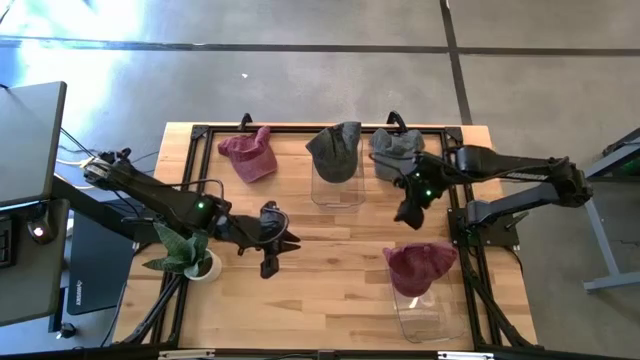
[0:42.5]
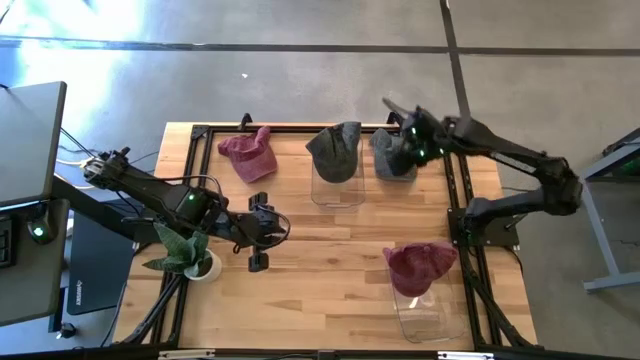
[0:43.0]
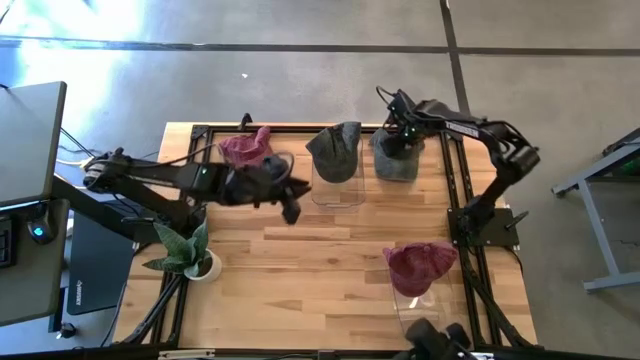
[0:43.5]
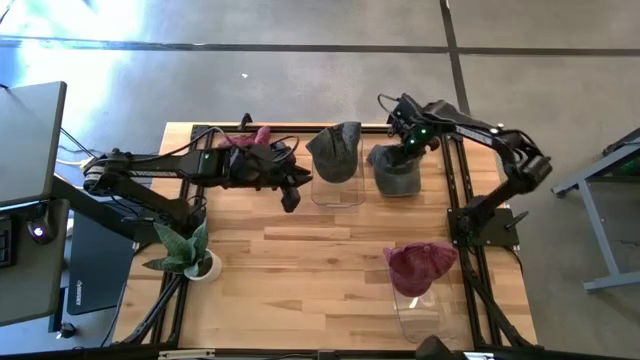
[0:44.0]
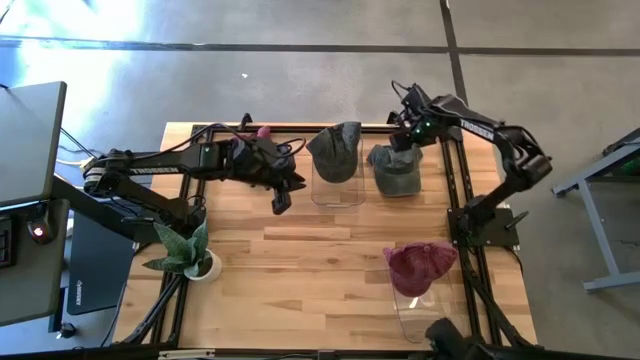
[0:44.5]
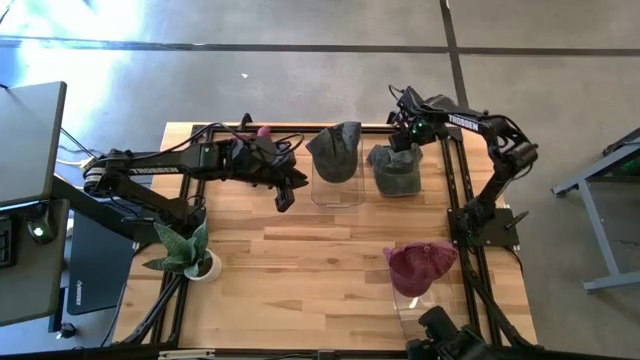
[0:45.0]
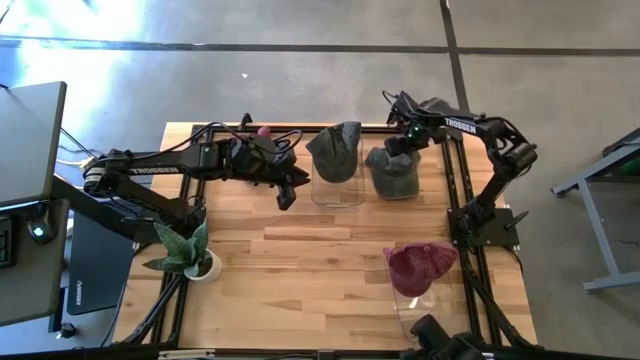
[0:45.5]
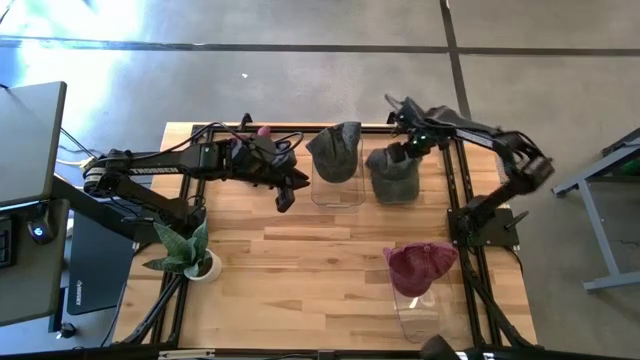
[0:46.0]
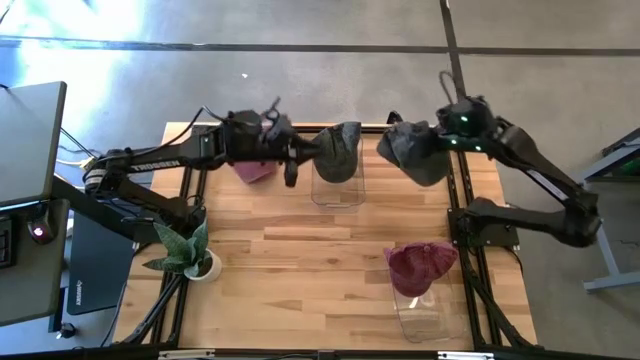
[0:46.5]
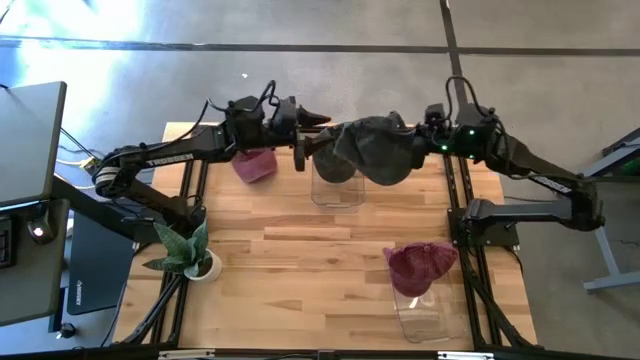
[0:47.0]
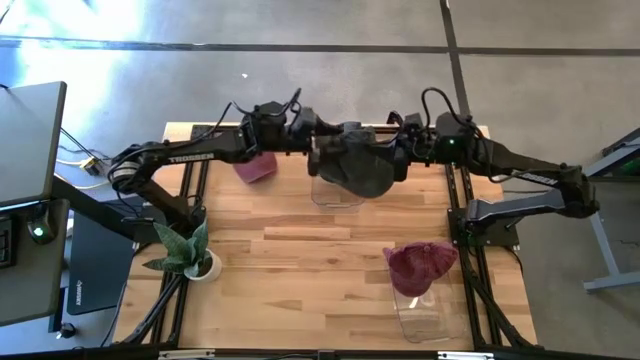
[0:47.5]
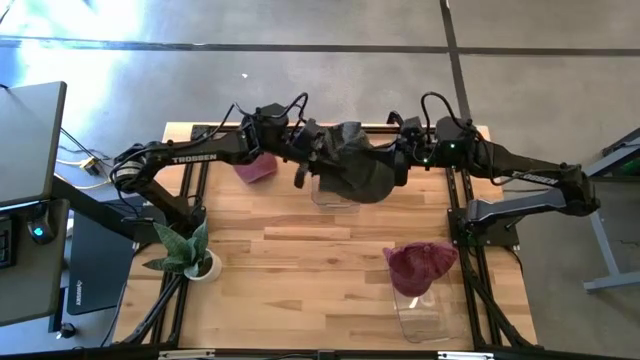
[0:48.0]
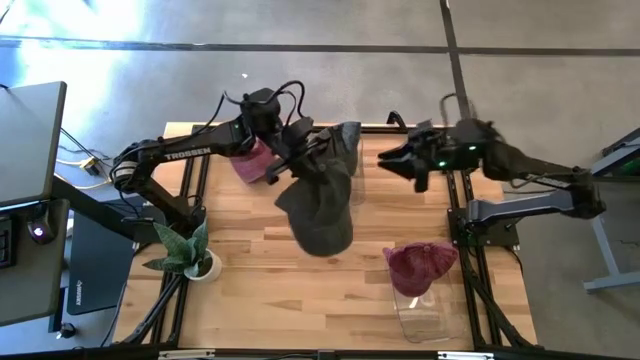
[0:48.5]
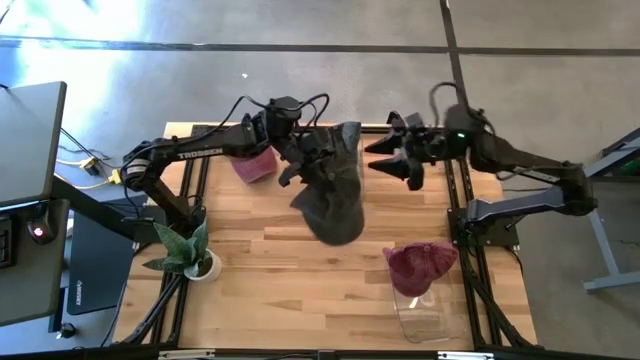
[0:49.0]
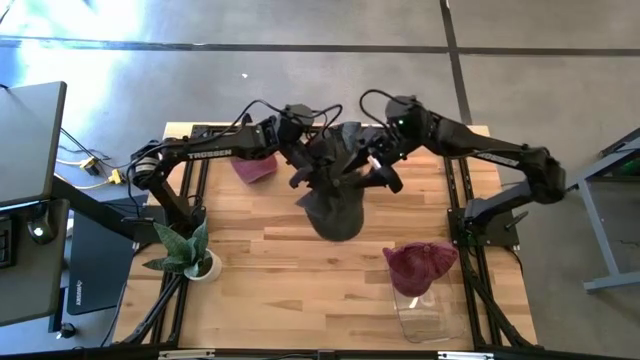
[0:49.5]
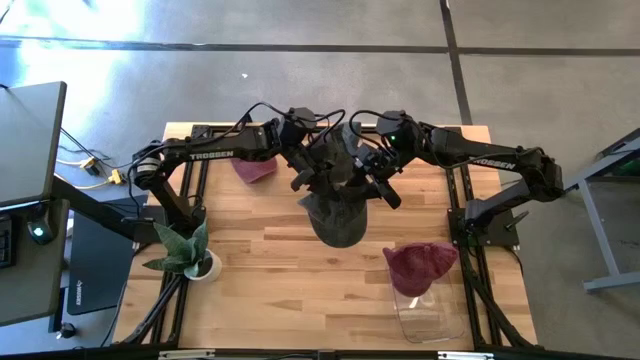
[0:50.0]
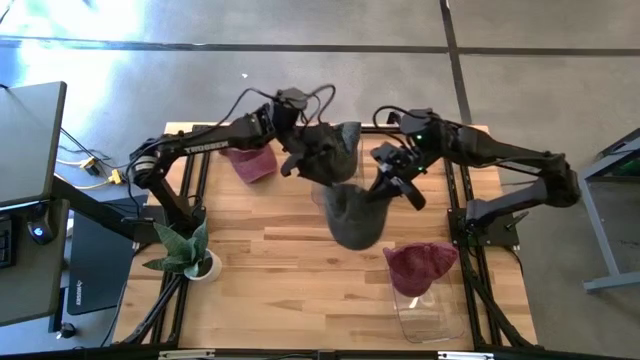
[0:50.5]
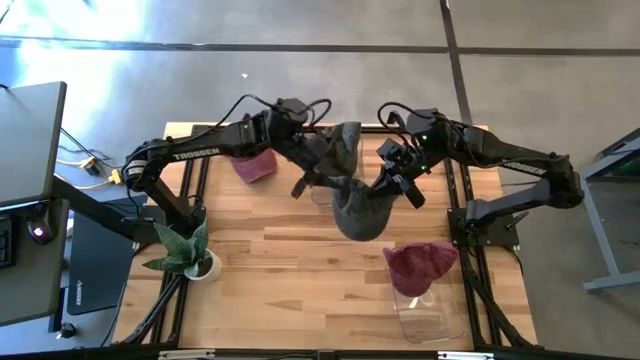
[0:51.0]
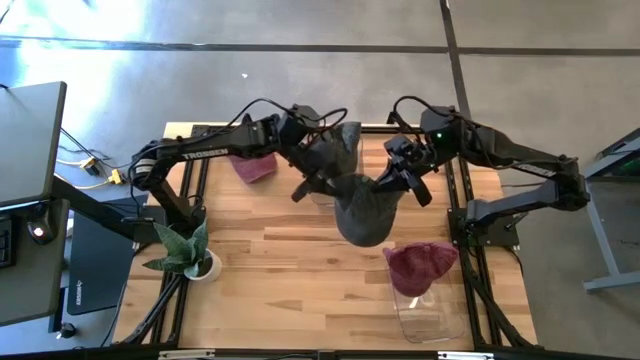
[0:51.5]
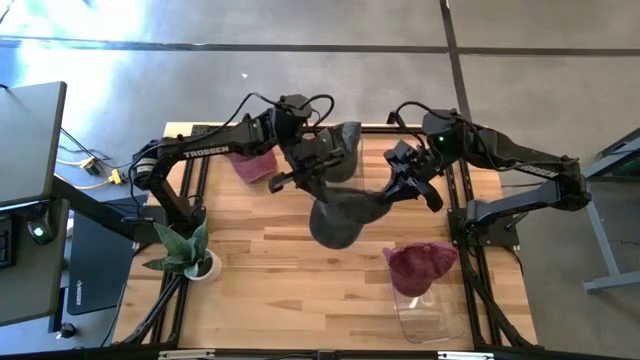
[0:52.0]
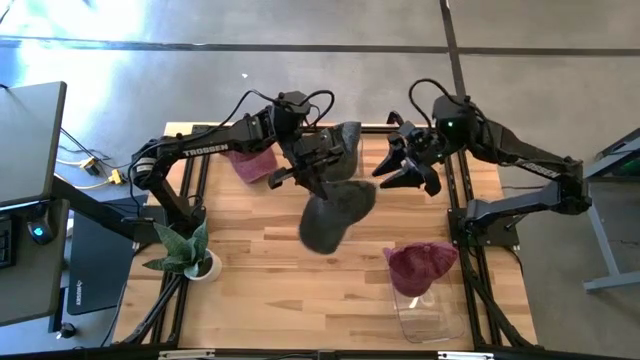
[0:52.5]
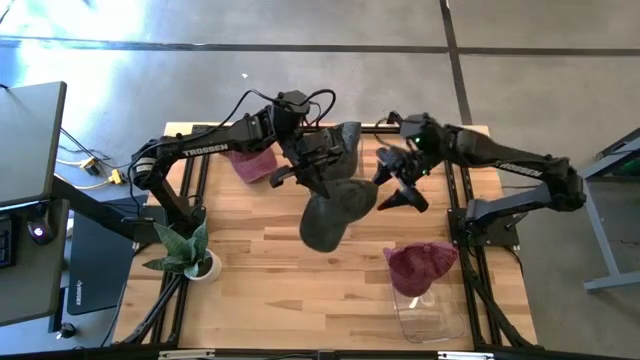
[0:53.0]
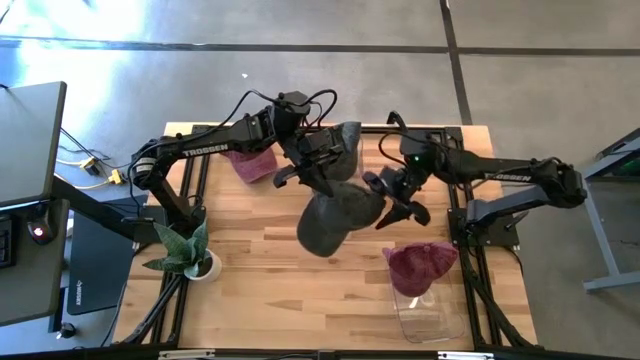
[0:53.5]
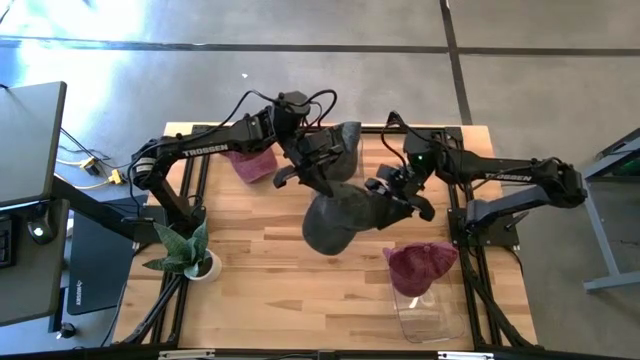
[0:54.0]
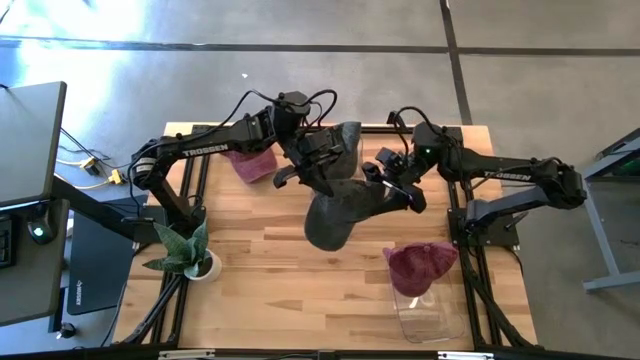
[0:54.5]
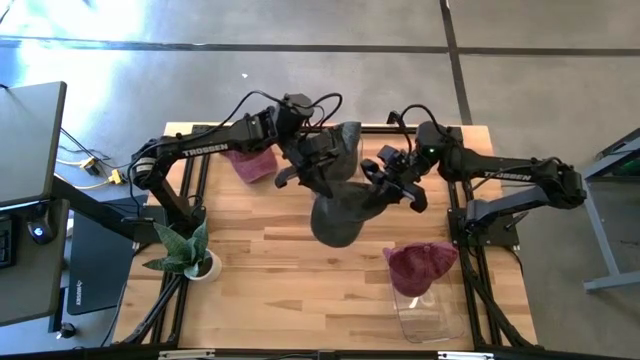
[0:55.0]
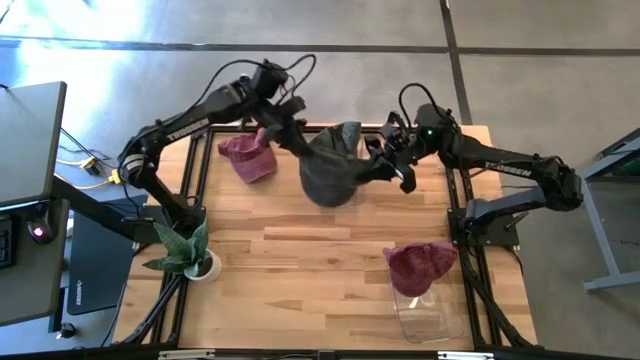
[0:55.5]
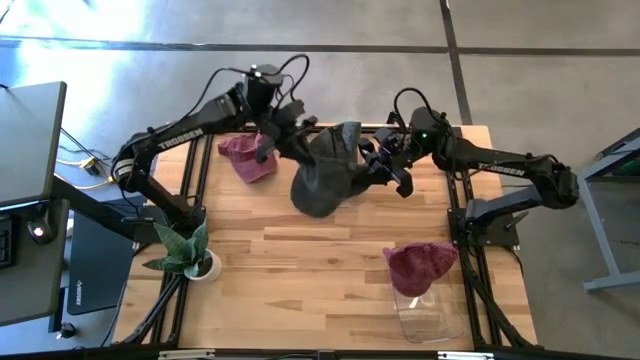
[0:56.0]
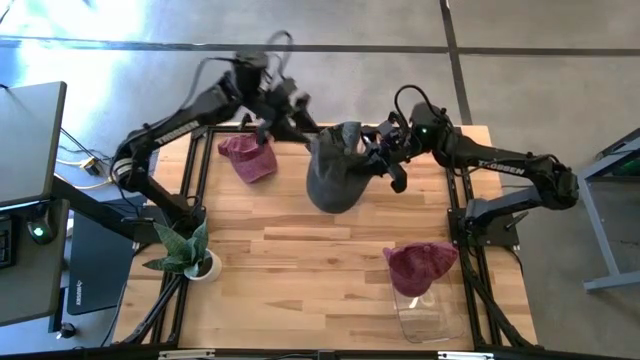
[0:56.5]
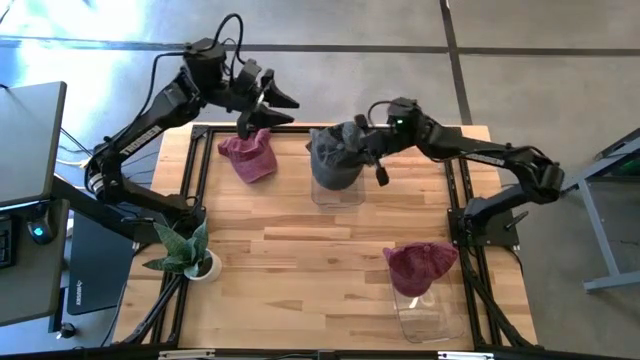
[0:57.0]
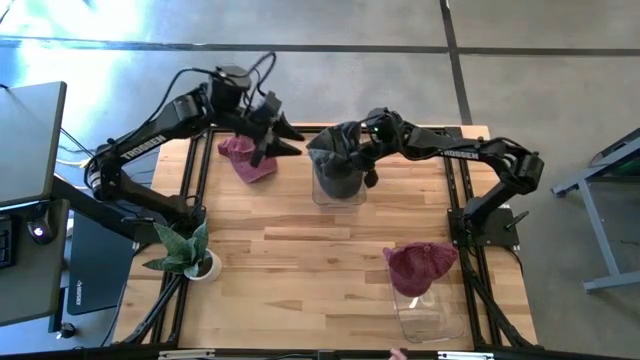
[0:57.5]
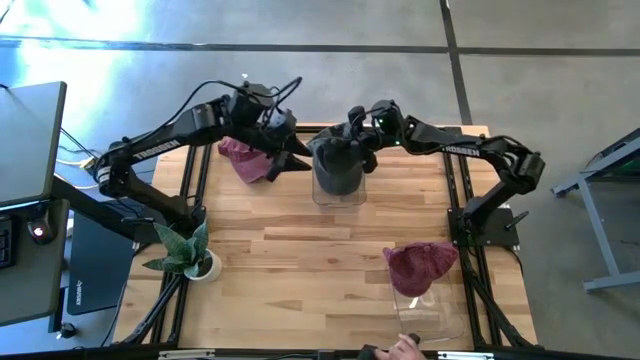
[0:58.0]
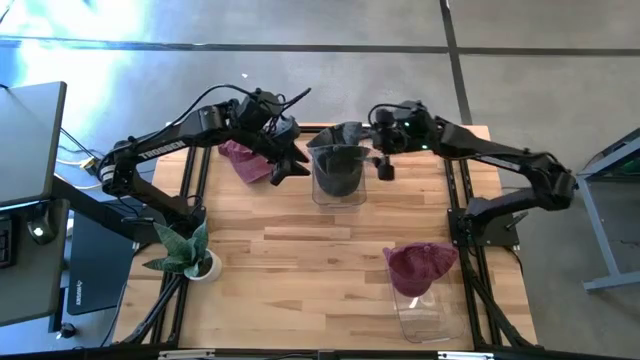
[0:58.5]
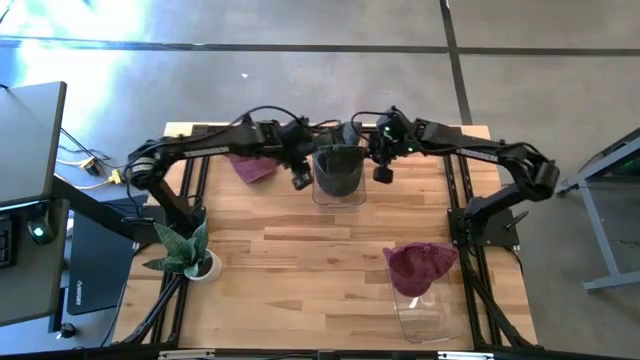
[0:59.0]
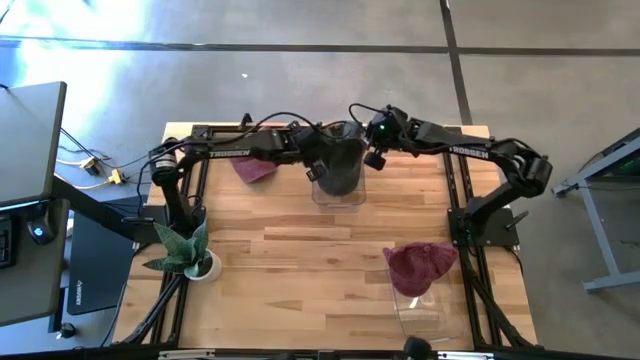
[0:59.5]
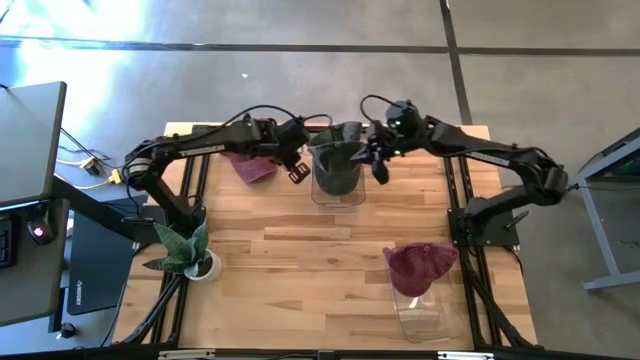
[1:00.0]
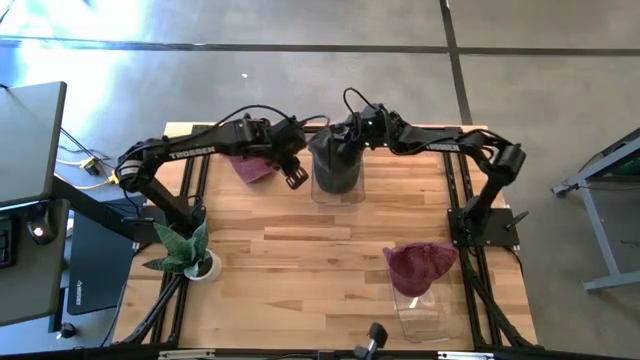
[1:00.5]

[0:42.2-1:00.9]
Task: Pick & Place hat
Put the black cap into the top transparent bin

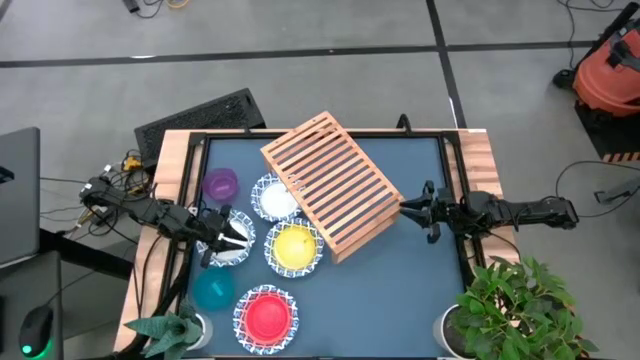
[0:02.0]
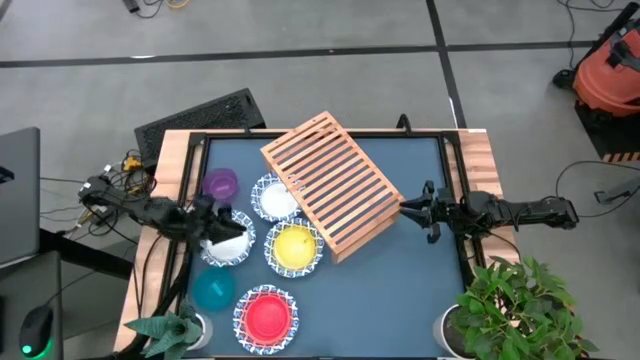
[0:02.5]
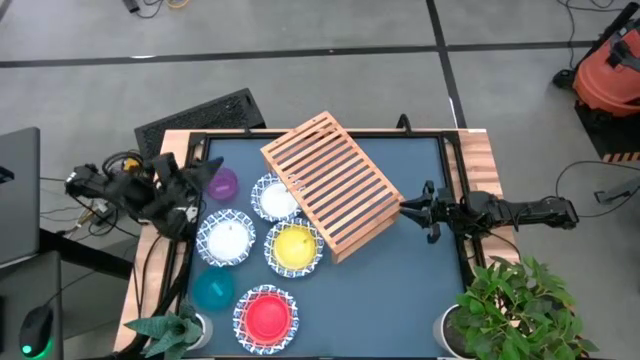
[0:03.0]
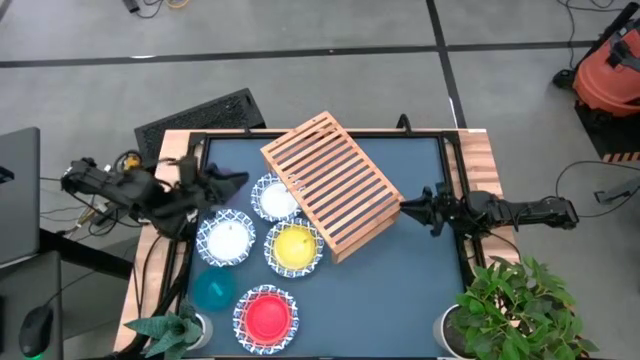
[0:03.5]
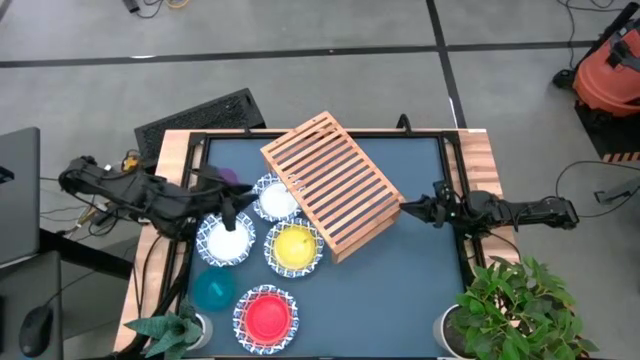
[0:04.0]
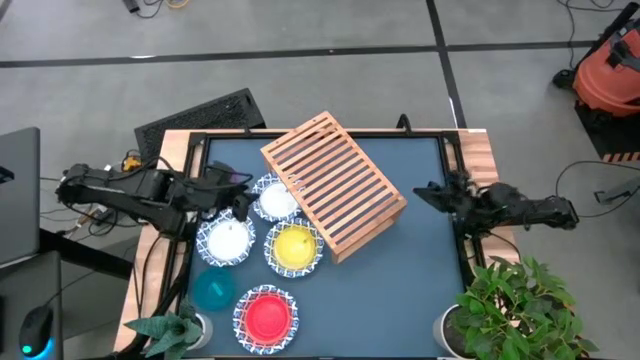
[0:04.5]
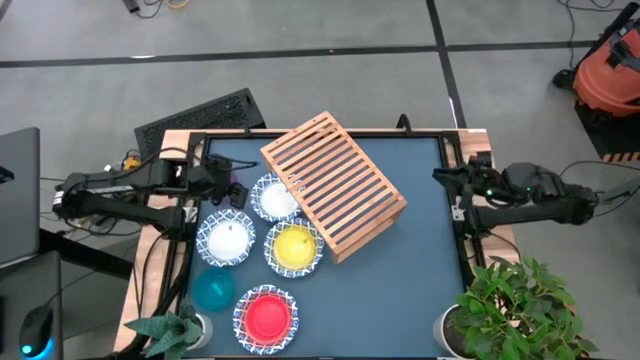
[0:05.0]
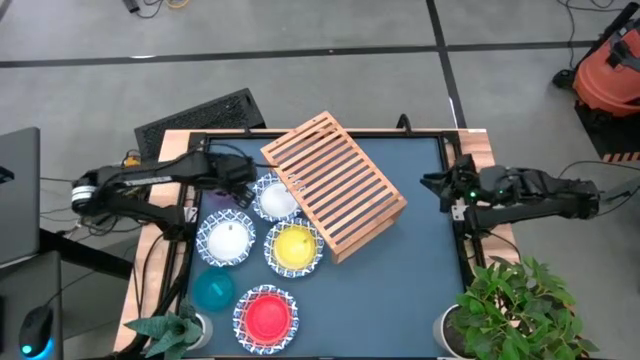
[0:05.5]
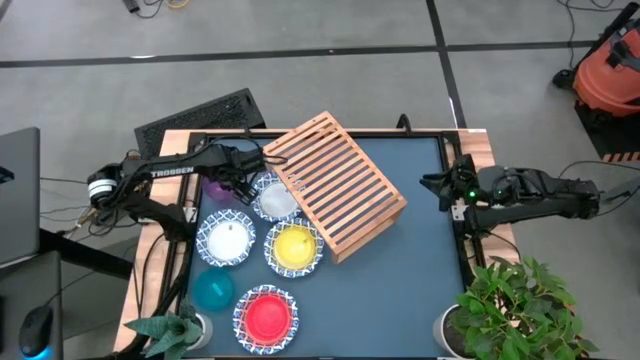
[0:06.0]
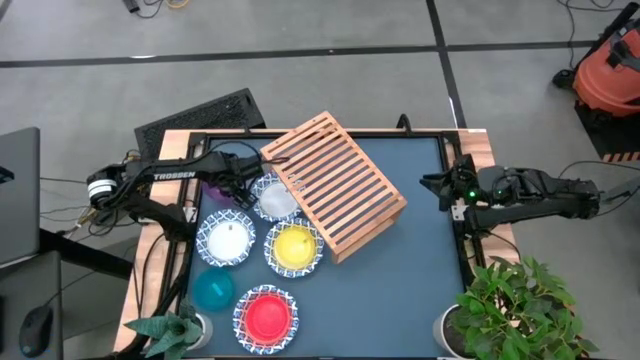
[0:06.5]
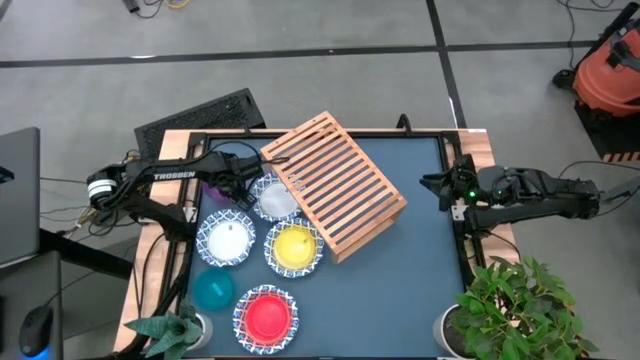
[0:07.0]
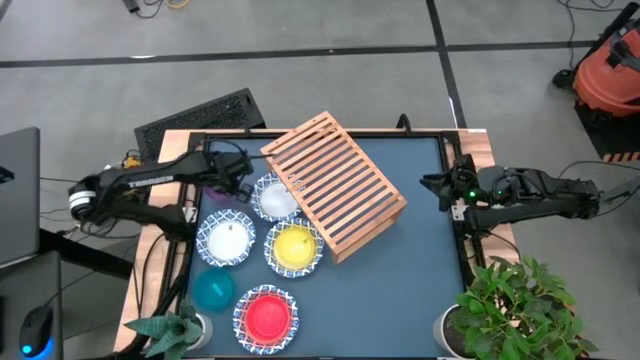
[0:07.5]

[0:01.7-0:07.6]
Task: Place and stack bowls onto a shelf
Put the violet bowl on the shelf
